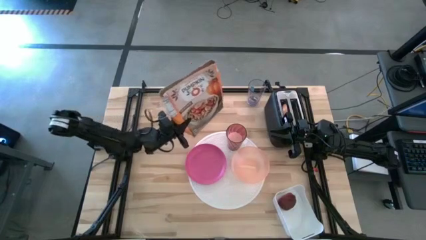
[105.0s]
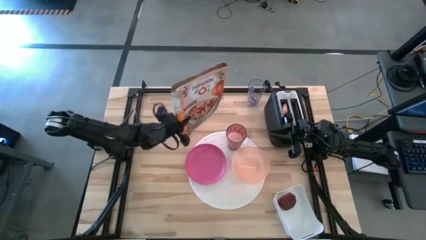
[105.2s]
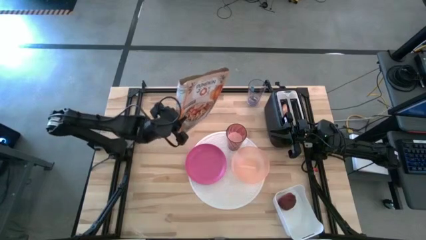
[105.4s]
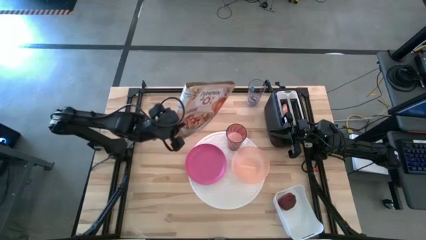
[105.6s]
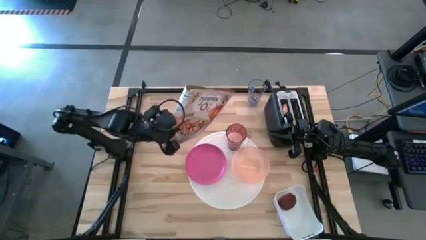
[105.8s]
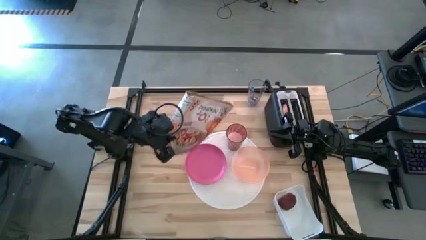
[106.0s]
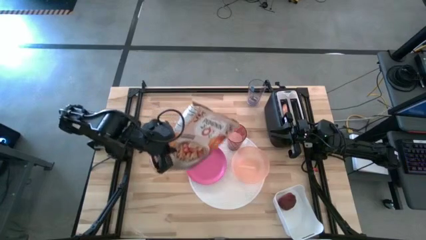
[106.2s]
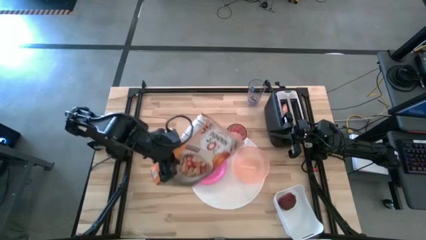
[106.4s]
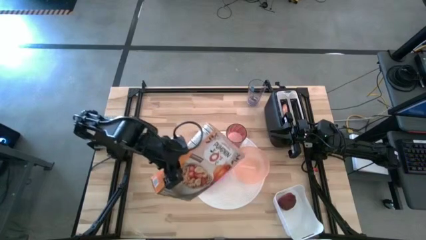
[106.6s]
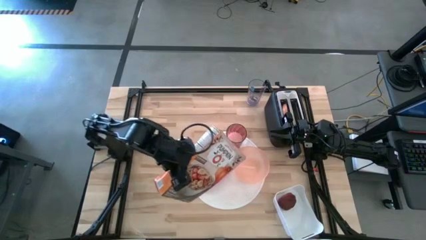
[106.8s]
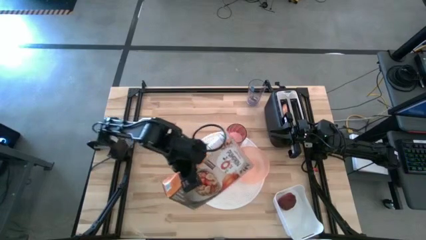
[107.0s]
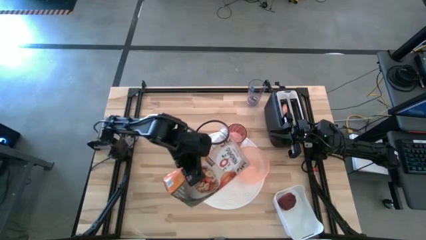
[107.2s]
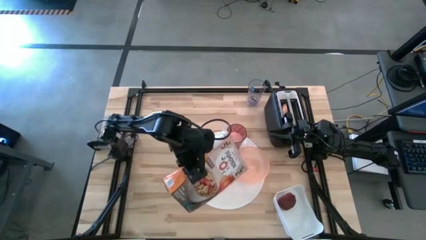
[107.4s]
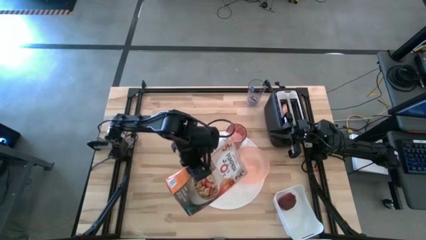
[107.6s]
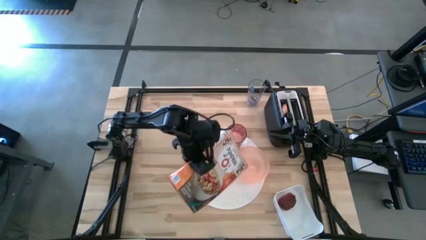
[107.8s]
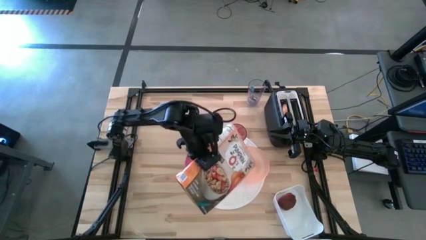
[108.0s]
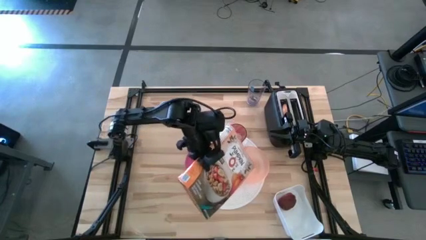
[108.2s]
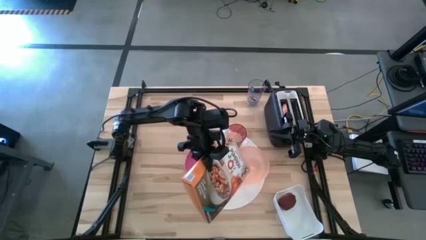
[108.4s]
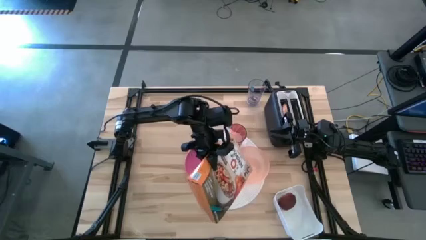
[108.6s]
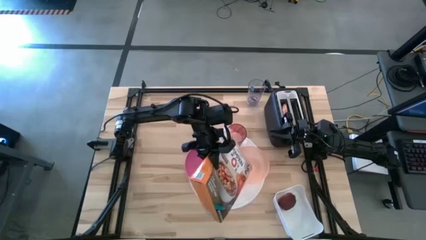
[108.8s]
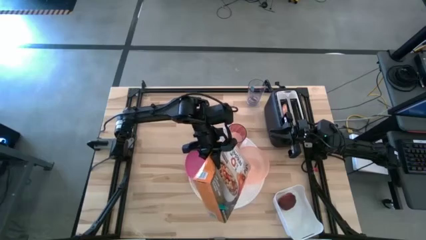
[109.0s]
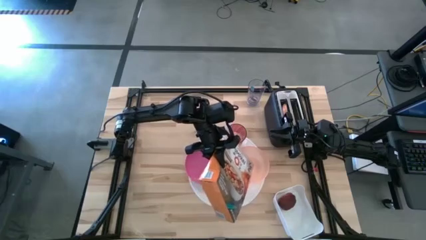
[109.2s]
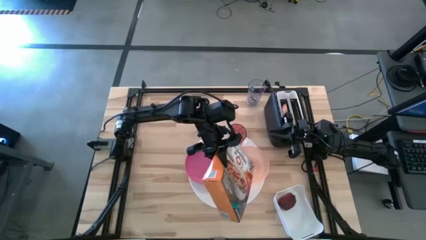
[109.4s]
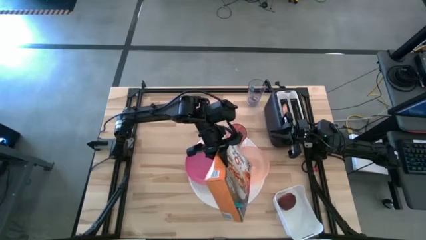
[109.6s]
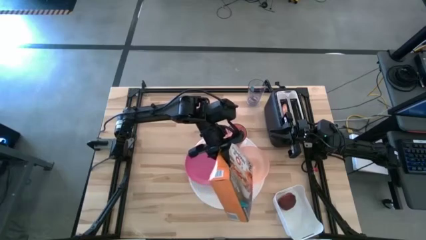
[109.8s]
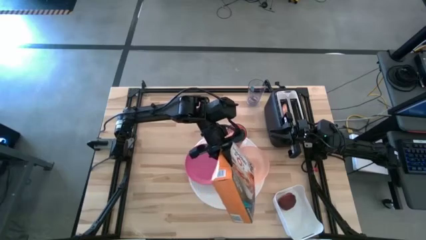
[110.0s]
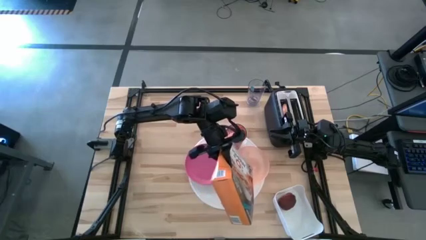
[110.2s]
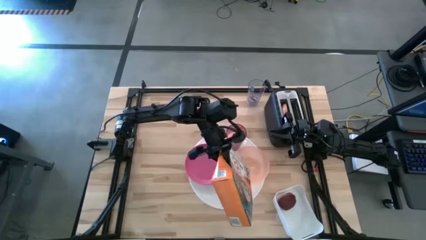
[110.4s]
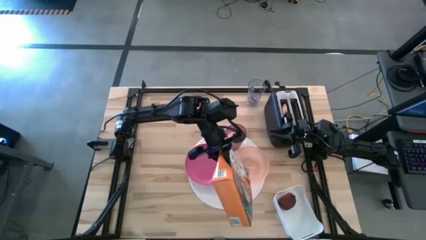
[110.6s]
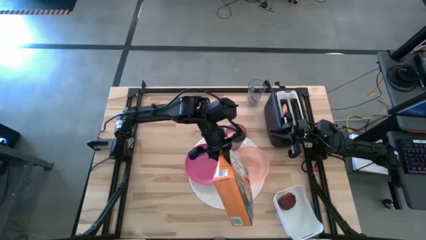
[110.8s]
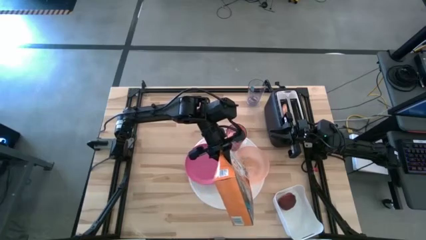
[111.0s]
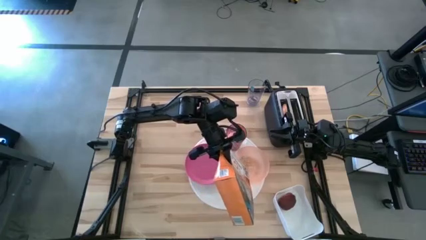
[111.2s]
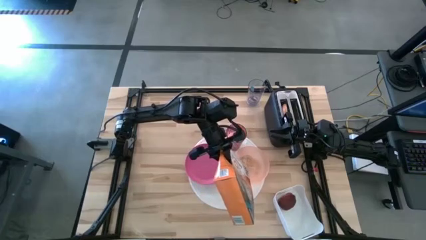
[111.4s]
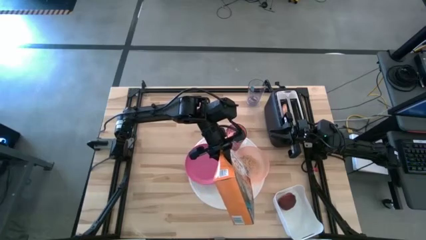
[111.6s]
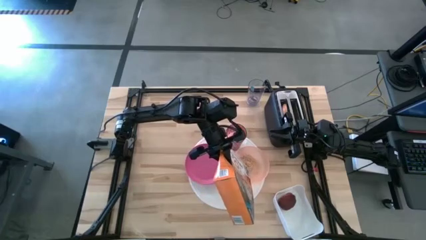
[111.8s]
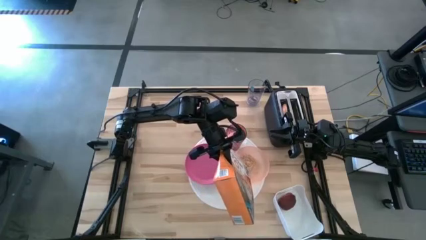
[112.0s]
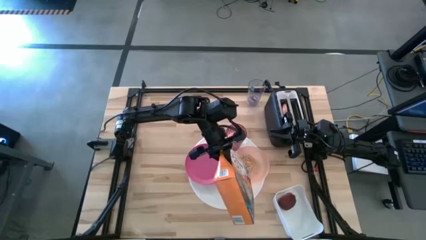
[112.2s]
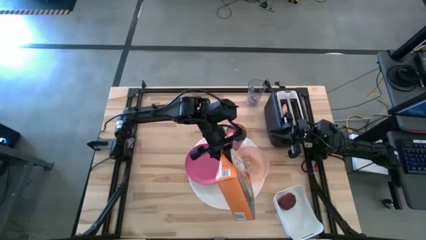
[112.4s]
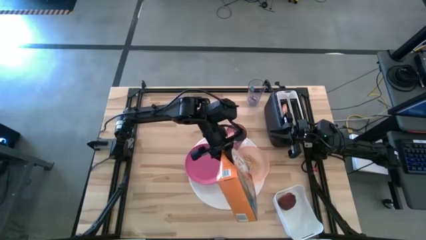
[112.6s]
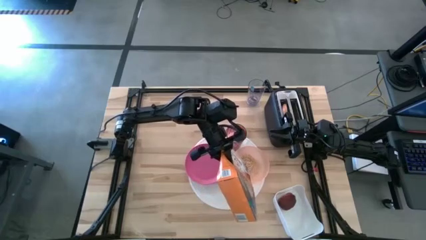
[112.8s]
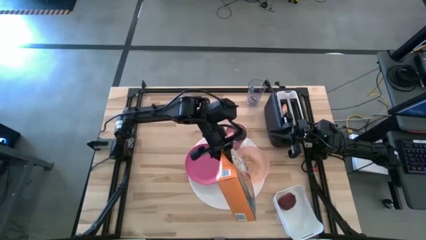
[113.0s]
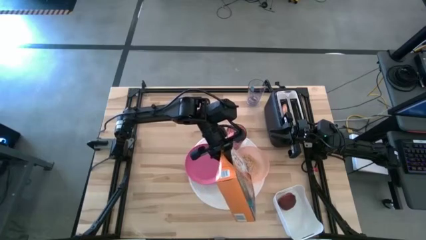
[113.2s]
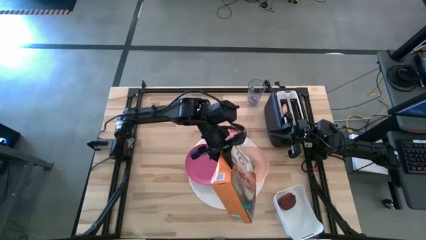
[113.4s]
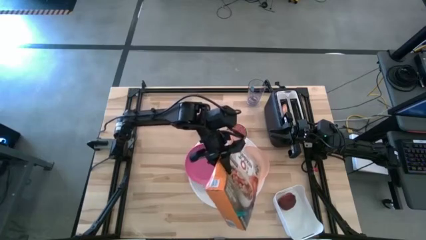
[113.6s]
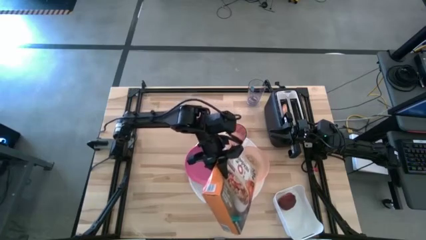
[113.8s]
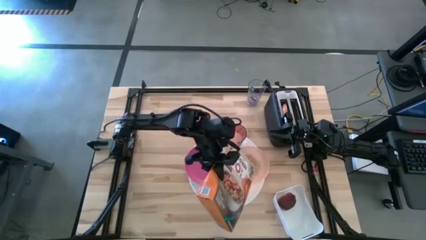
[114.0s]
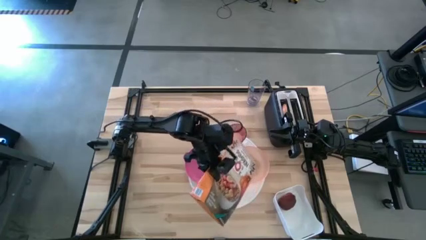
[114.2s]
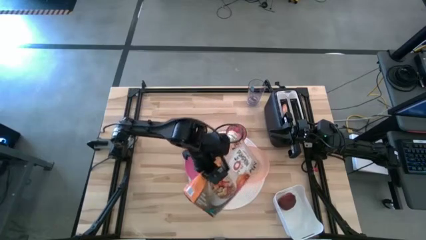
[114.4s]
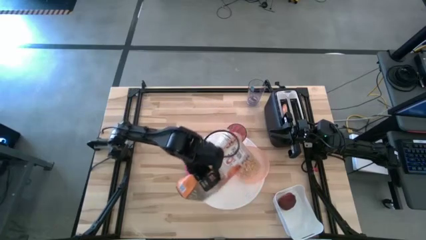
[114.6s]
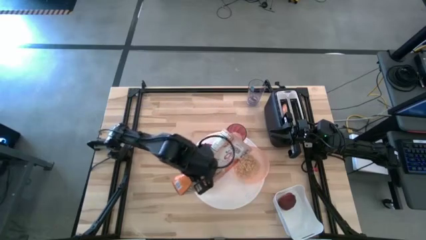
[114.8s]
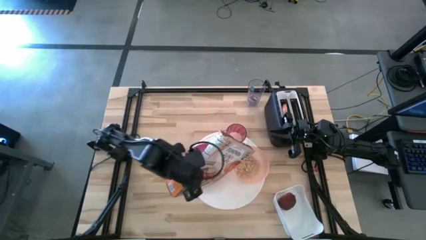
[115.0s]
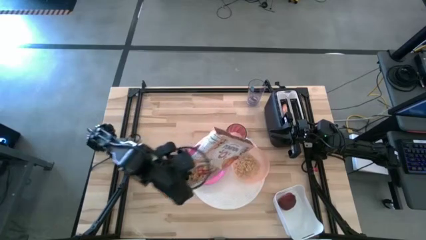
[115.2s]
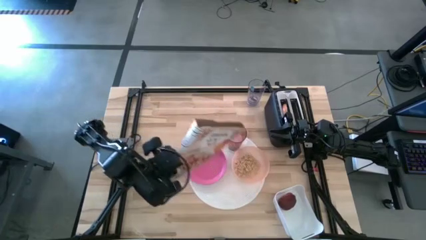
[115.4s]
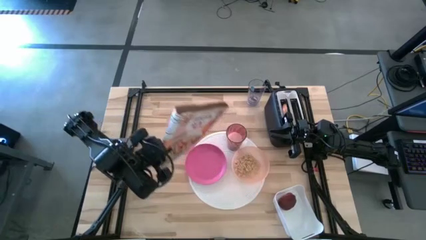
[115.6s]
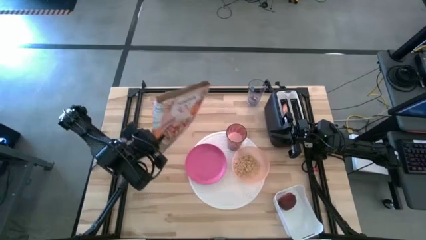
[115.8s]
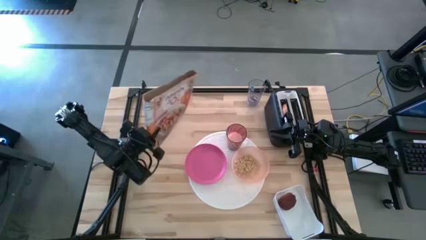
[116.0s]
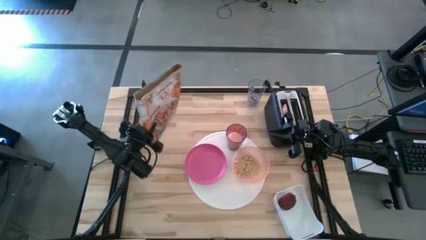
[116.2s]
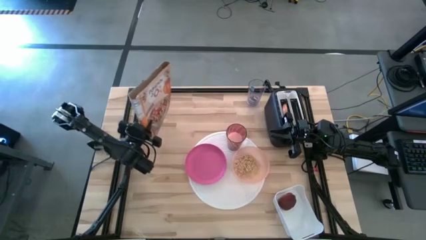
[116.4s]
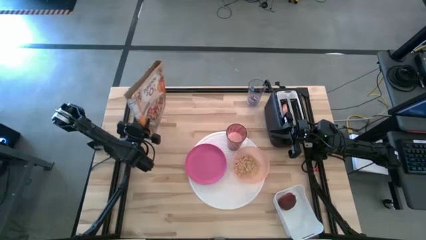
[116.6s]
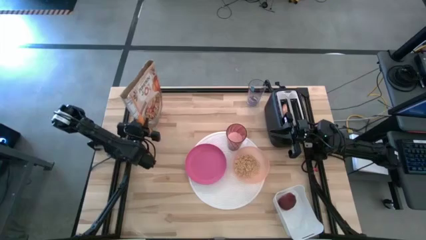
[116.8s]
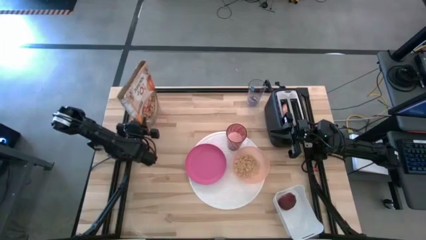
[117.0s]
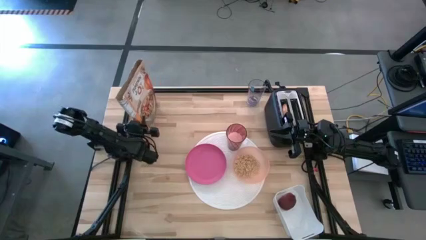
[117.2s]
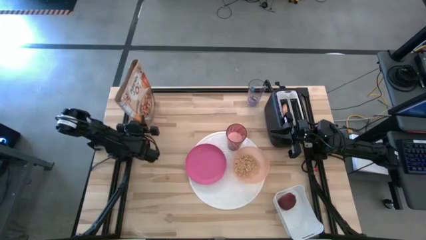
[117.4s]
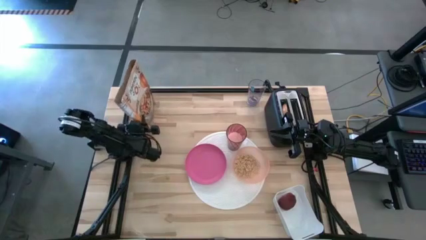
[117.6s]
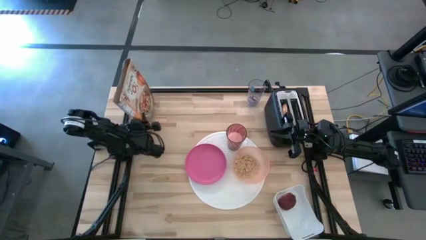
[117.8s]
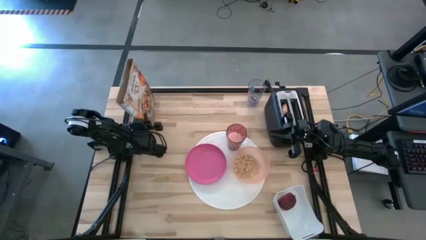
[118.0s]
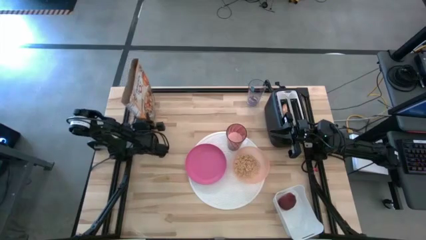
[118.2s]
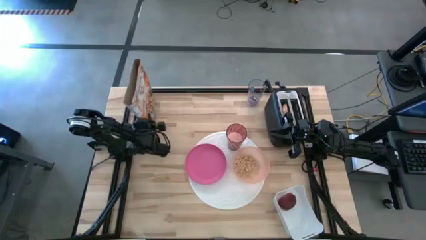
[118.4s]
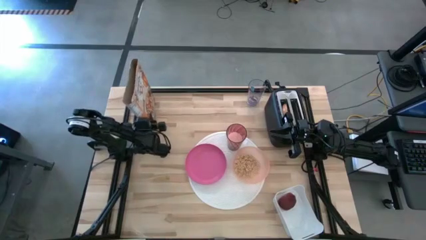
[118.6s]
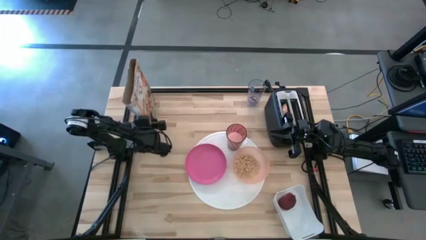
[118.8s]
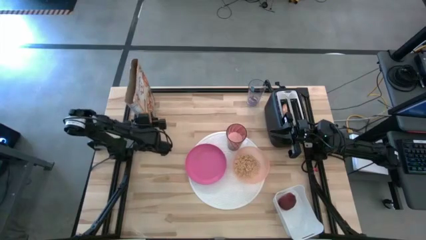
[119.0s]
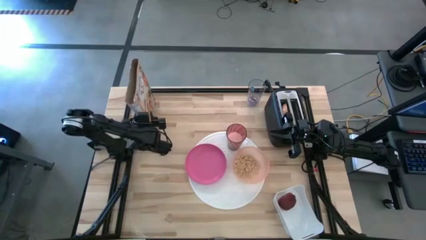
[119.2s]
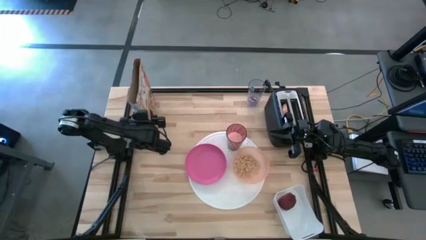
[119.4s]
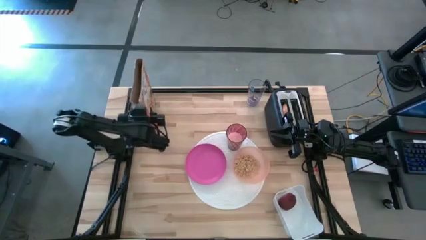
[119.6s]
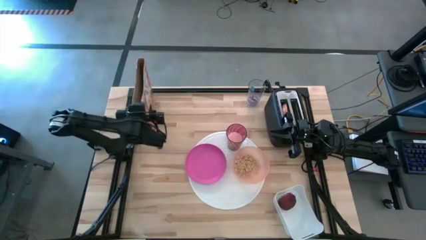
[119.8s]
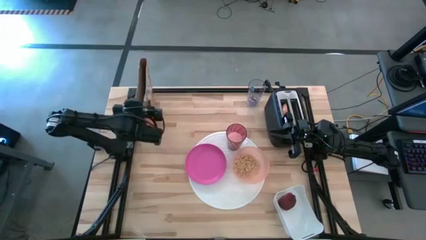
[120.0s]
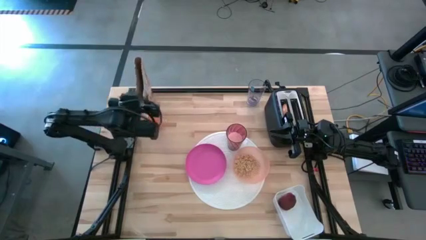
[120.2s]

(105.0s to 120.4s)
Task: Arrange a breakfast setting
Pour the cereal into the orange bowl
